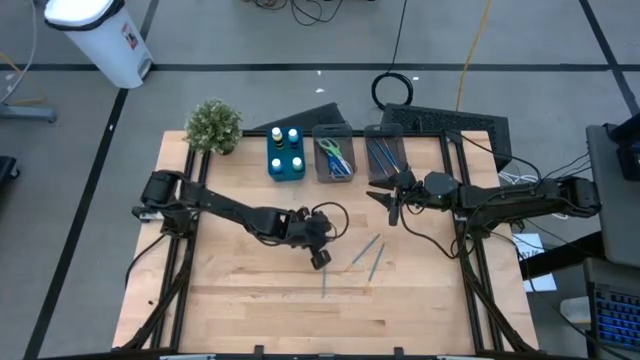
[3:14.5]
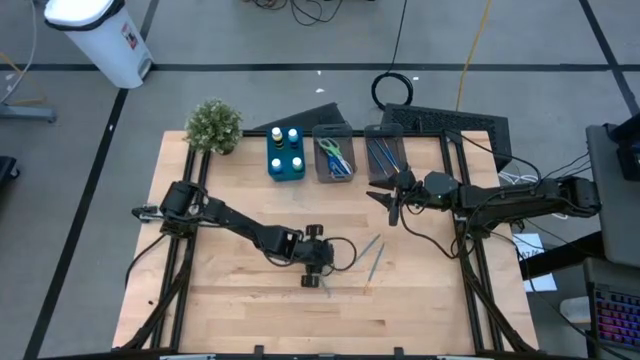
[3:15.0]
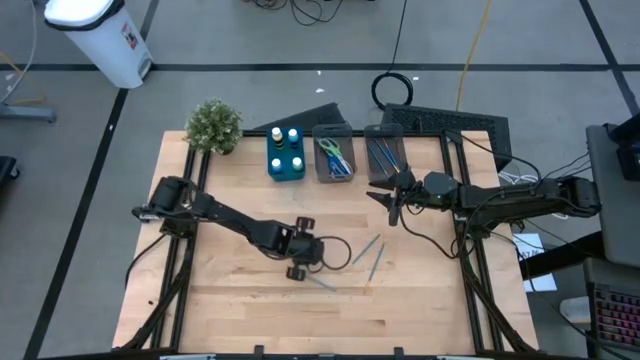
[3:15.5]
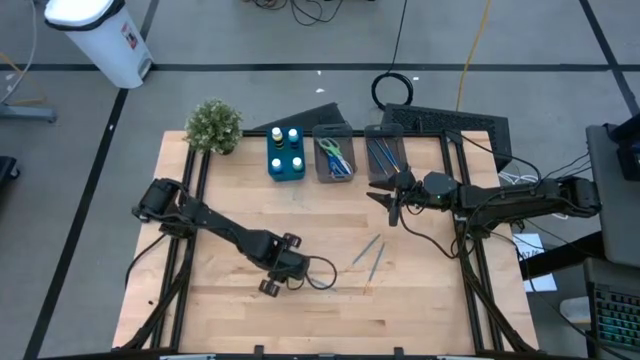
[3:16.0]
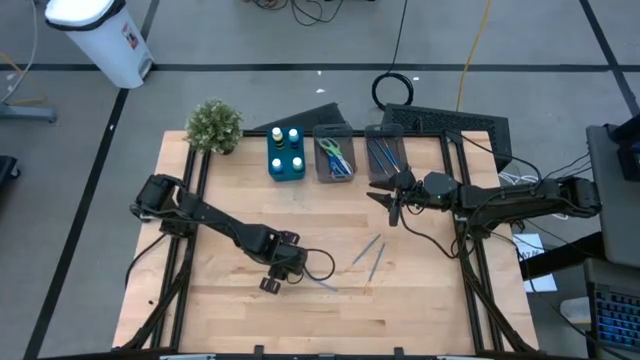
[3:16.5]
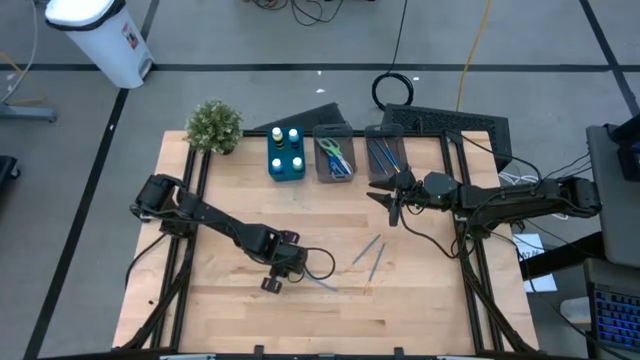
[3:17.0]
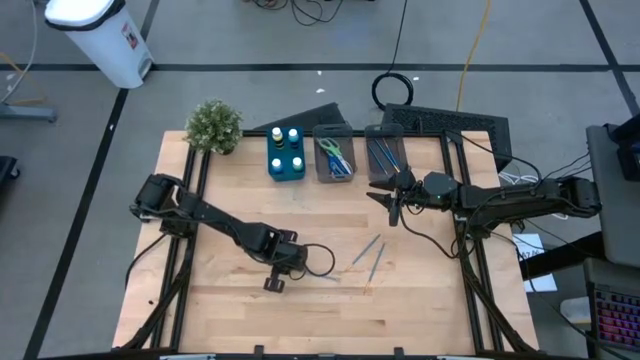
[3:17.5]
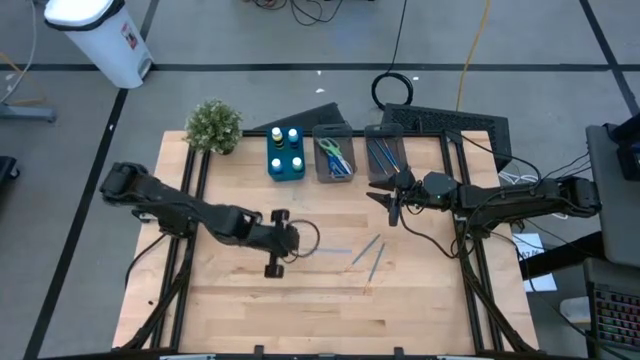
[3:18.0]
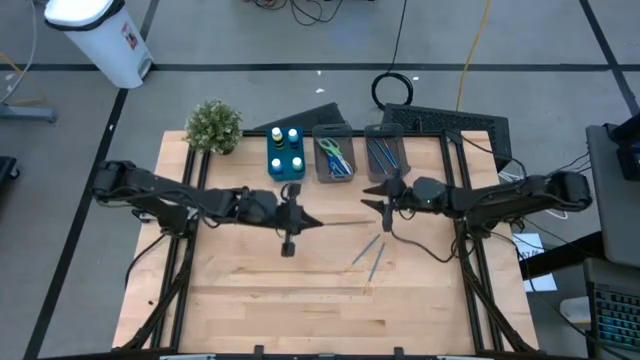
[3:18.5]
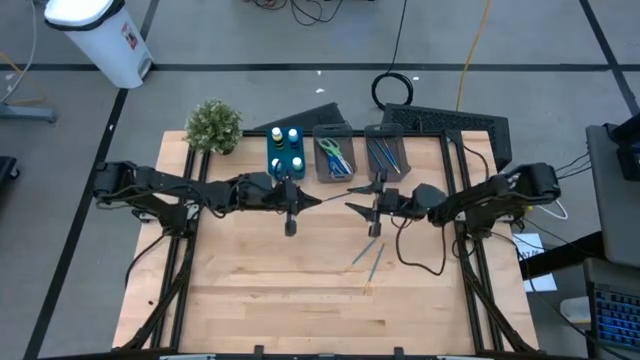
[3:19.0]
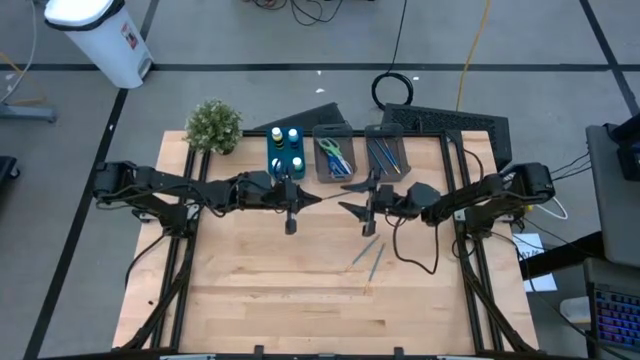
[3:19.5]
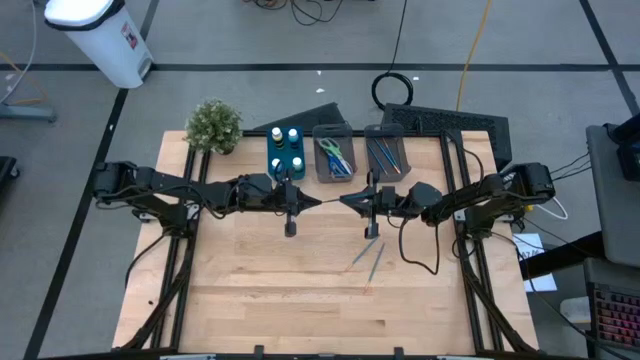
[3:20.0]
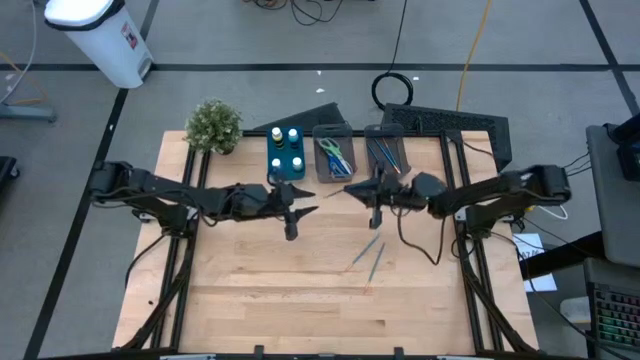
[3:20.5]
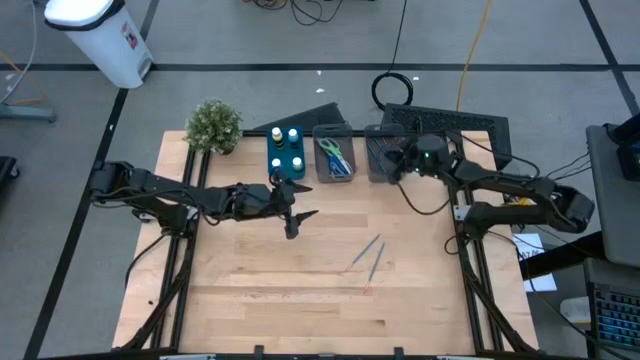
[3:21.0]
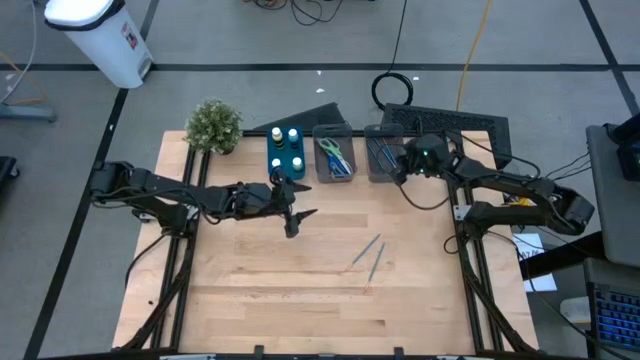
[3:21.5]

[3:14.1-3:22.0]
Task: Pick & Place Paint Supplies
Put the blue paint brush into the right black bin

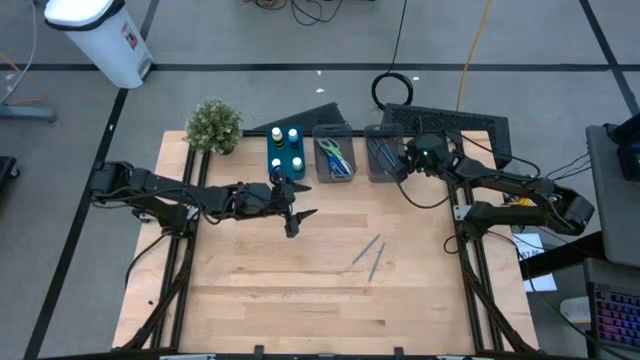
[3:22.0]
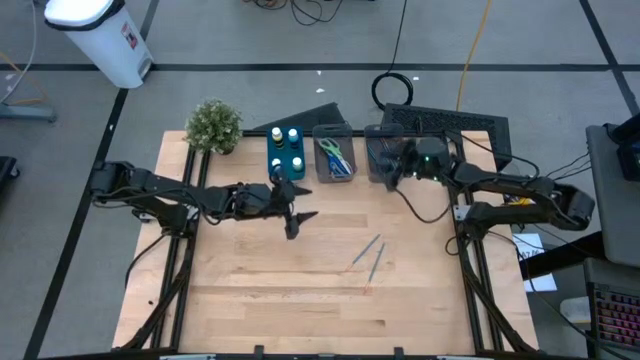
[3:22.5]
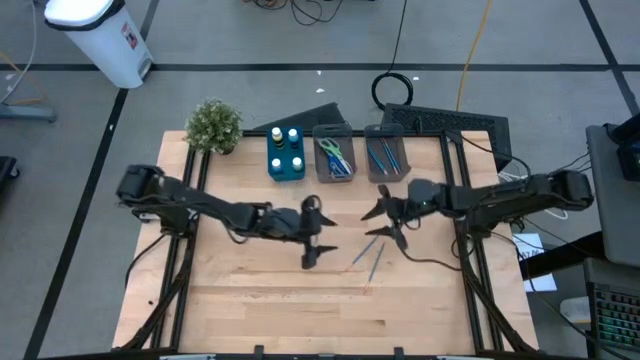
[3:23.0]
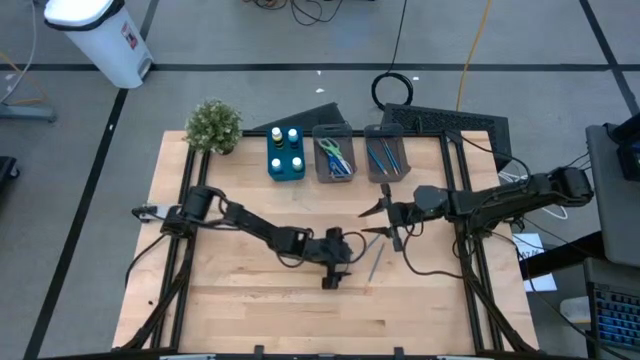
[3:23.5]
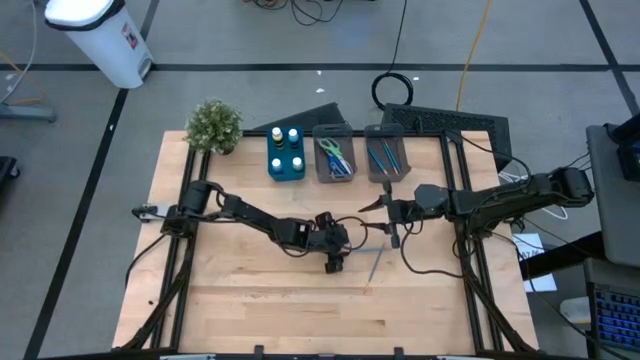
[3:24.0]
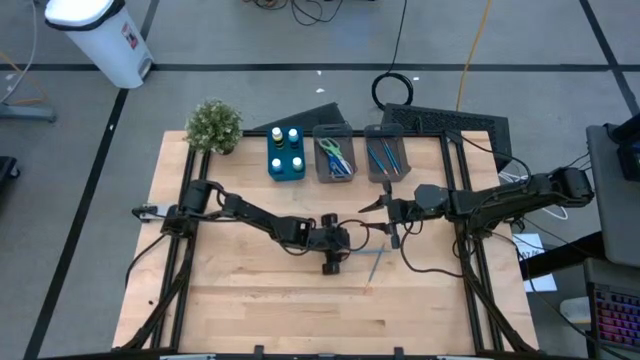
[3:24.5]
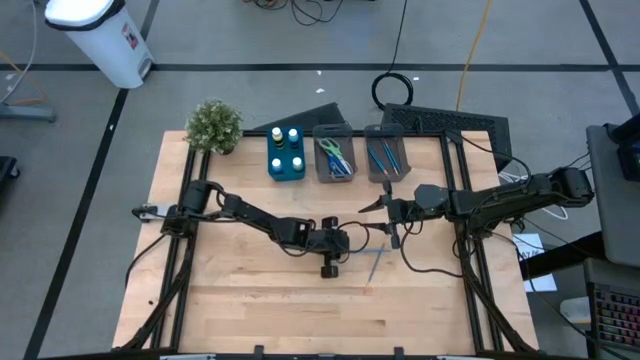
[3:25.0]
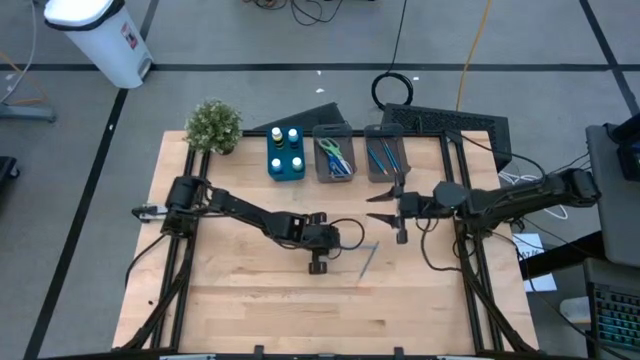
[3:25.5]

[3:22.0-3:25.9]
Put the blue paint brush into the right black bin

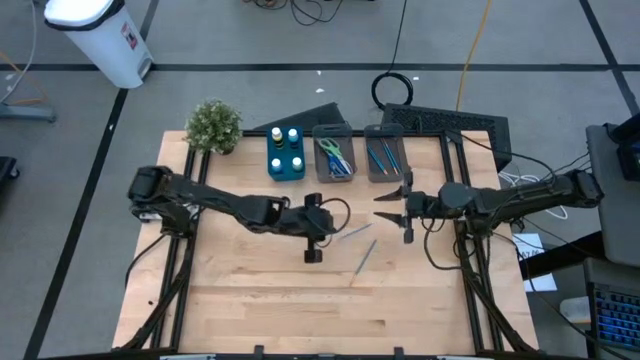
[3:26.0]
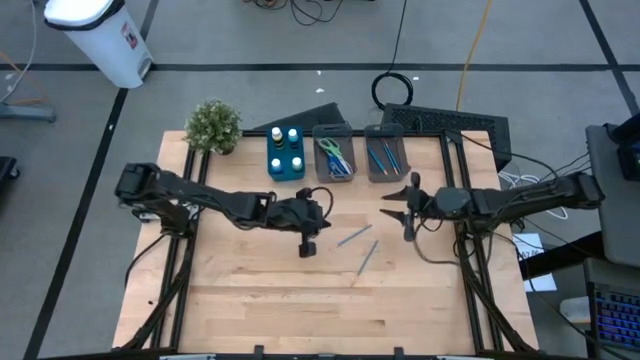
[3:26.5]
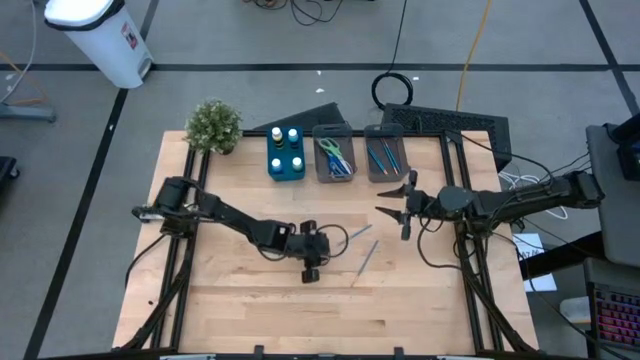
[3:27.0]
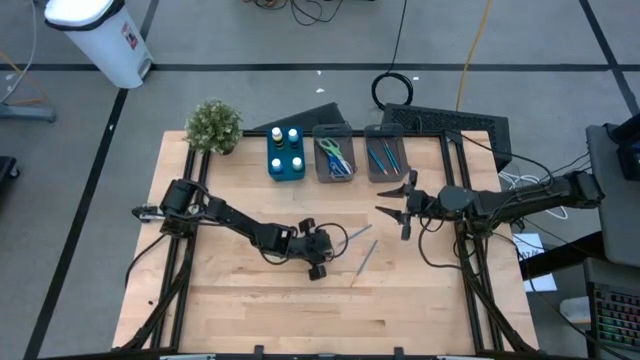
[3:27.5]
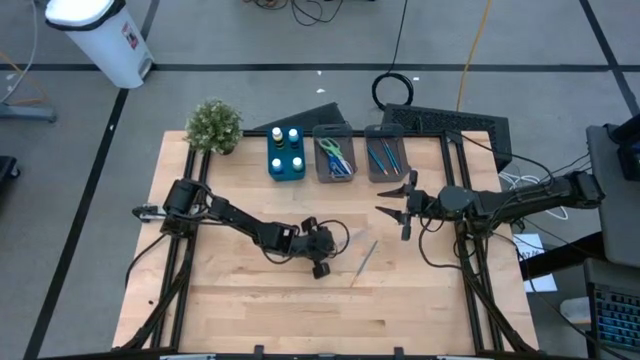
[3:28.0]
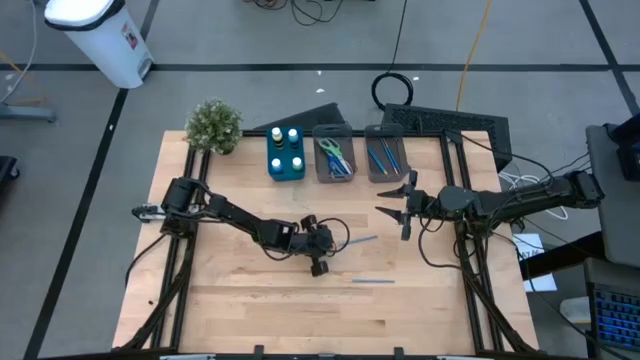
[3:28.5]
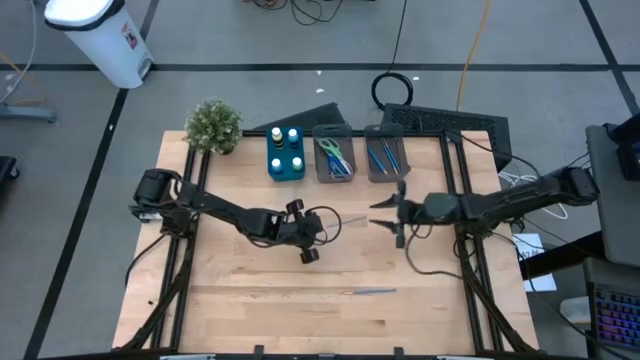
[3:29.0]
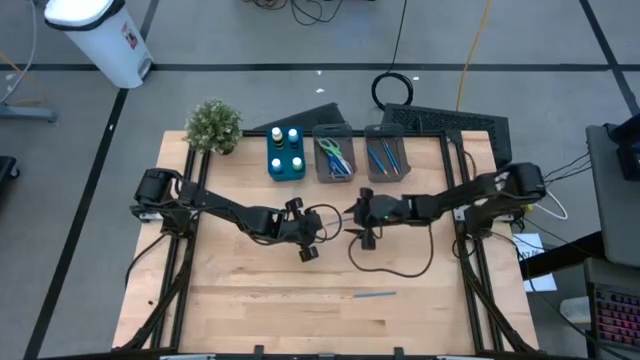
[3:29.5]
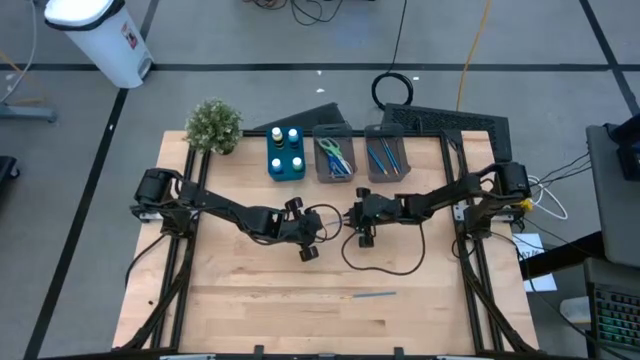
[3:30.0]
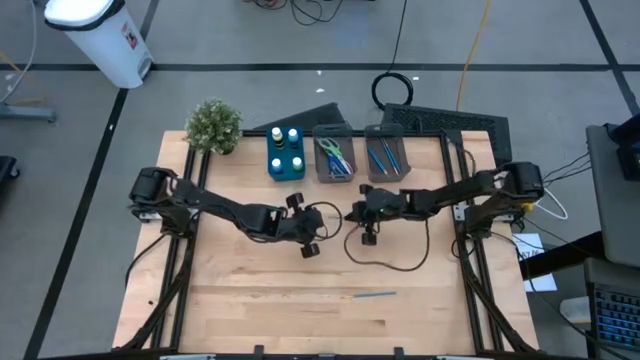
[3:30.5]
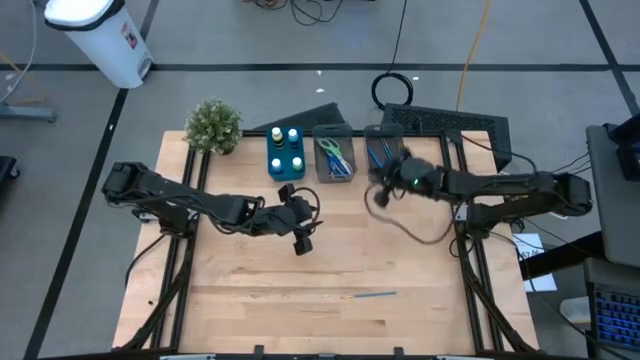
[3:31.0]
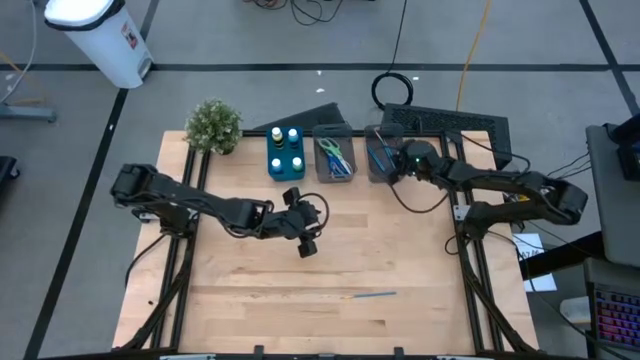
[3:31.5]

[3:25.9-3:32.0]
Put the blue paint brush into the right black bin

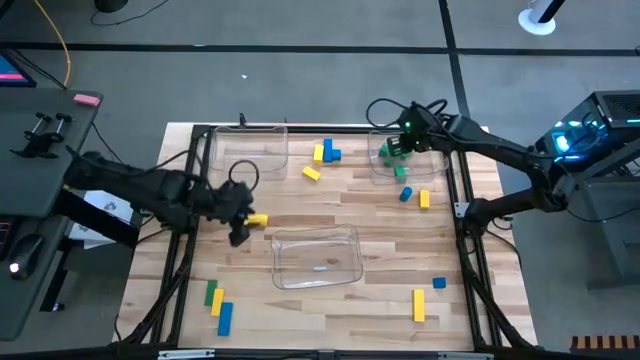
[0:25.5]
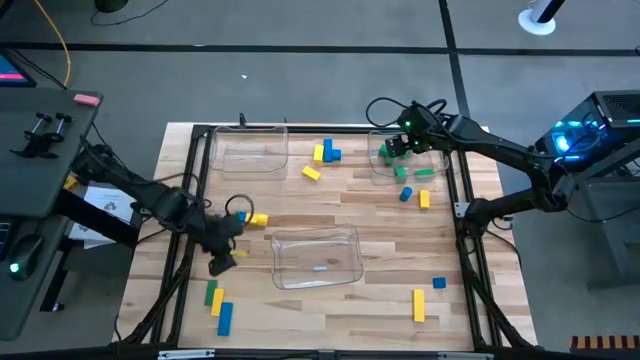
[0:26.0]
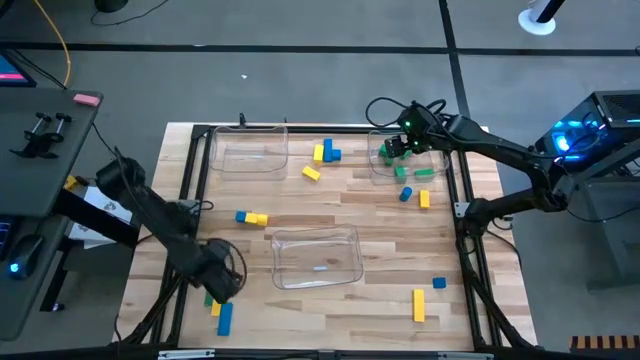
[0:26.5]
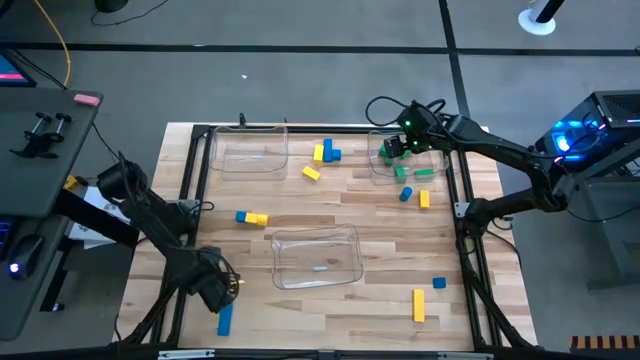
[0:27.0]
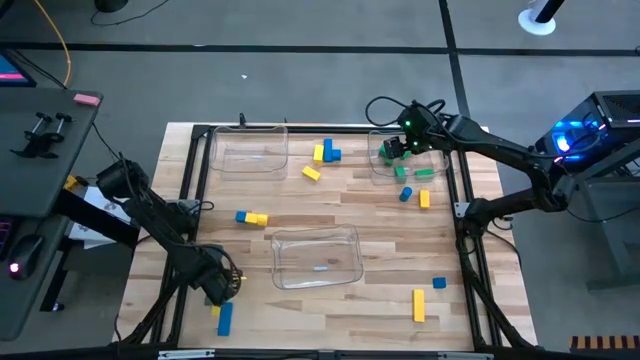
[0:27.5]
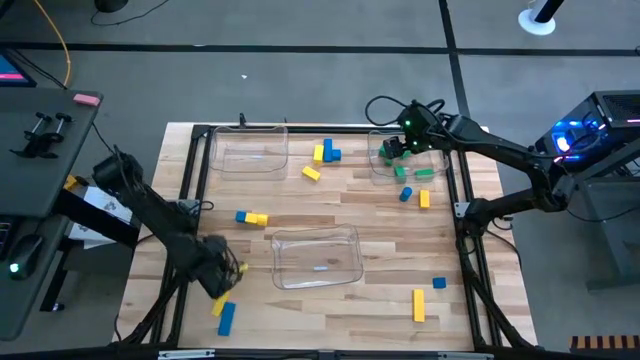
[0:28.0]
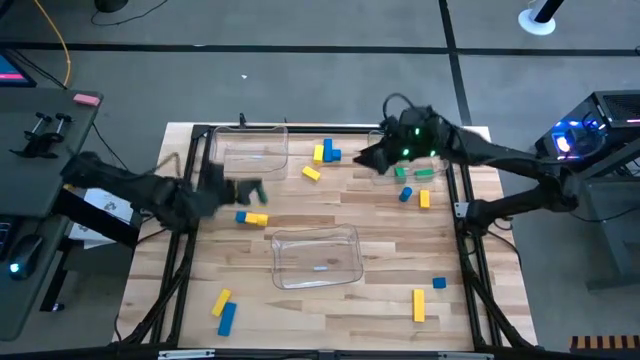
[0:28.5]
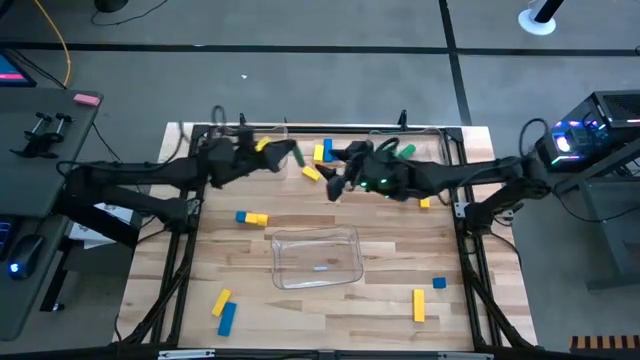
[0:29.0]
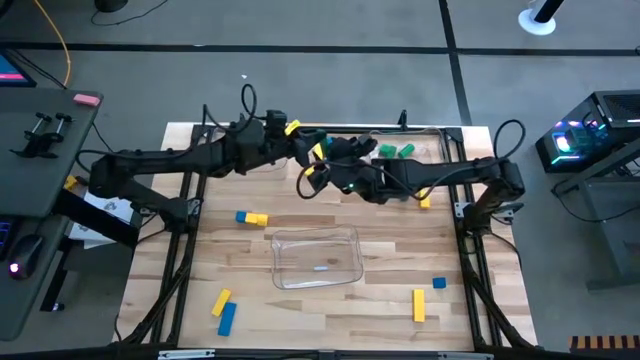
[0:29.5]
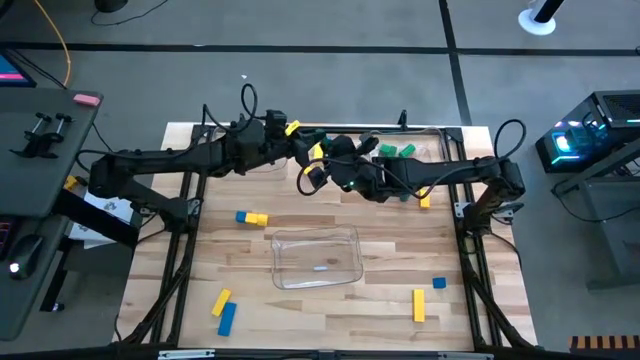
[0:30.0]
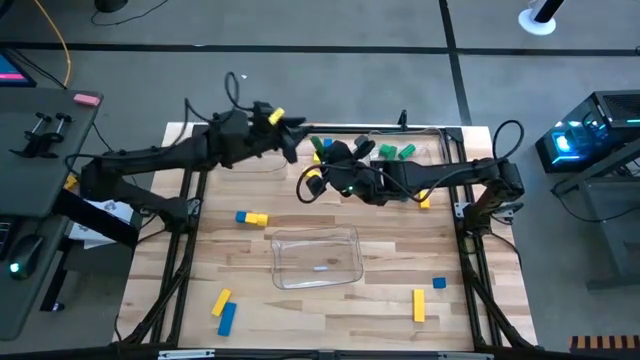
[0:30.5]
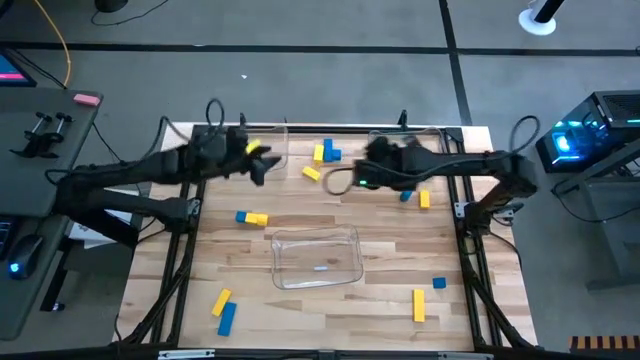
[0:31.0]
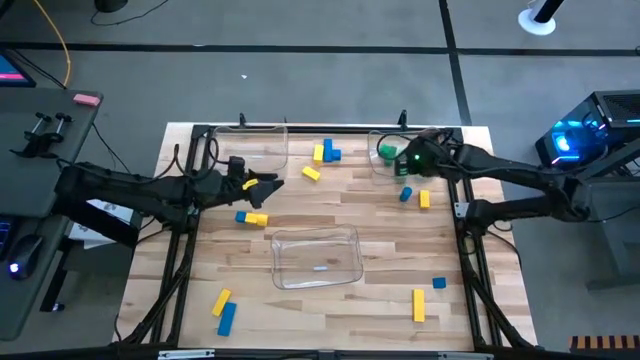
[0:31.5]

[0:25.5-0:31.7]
Task: Sort blocks
Put the green block into the top right transparent bin
